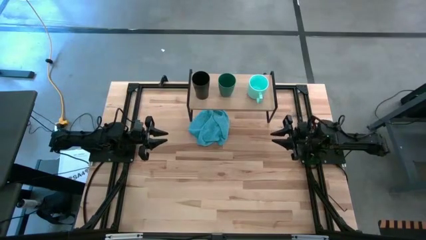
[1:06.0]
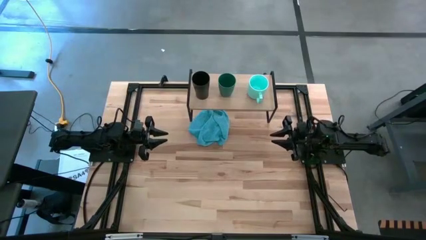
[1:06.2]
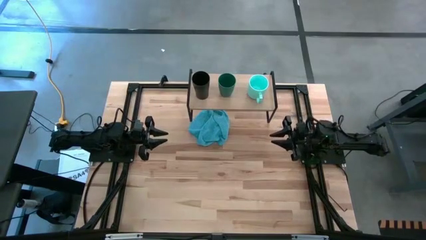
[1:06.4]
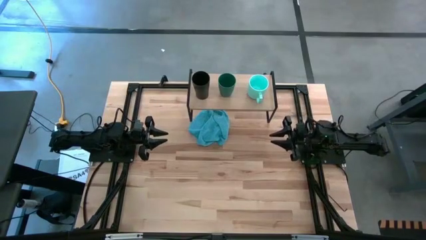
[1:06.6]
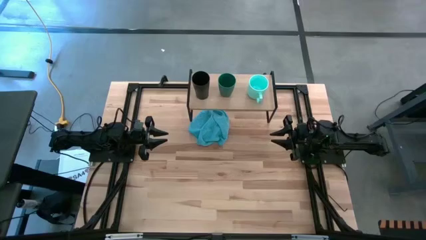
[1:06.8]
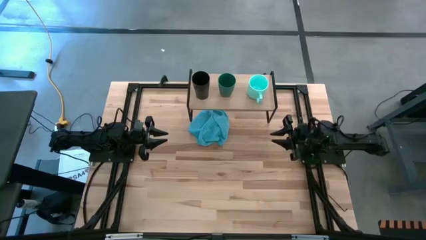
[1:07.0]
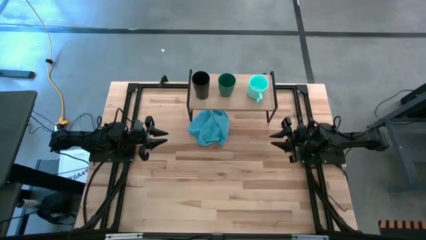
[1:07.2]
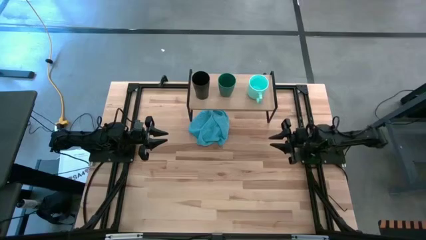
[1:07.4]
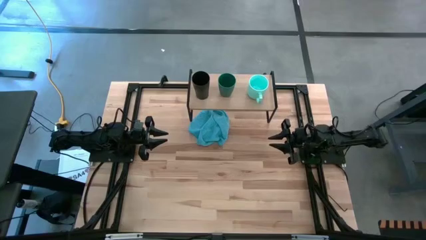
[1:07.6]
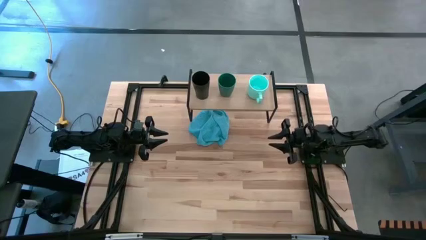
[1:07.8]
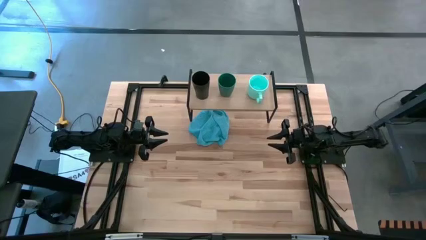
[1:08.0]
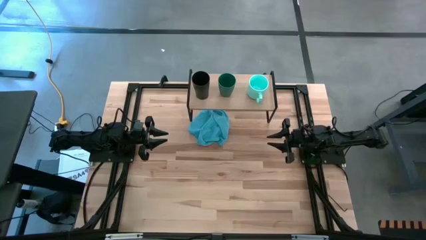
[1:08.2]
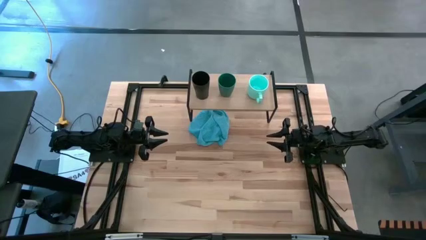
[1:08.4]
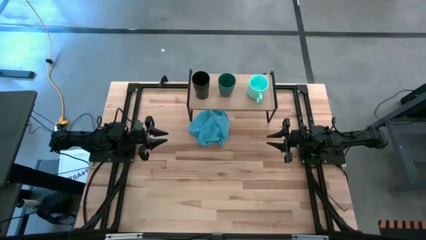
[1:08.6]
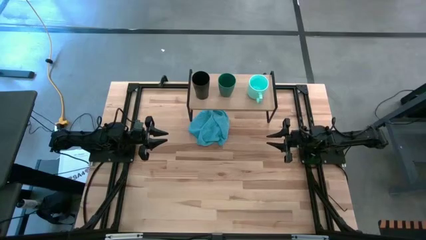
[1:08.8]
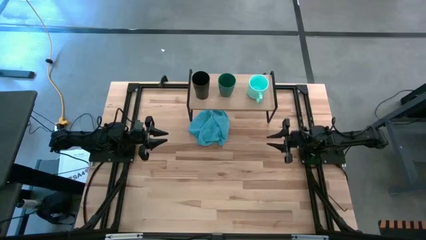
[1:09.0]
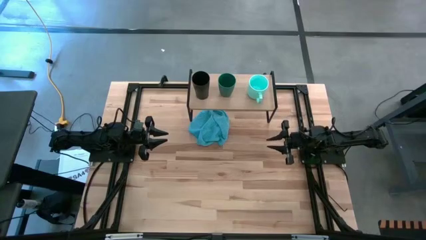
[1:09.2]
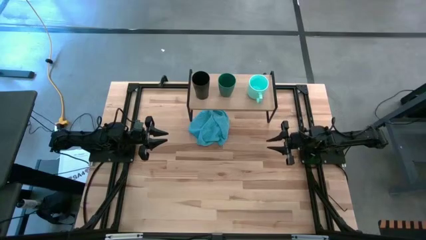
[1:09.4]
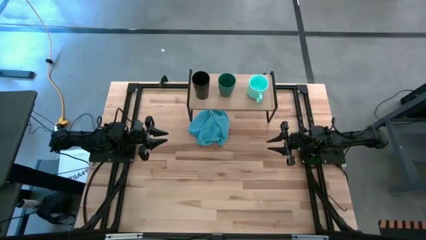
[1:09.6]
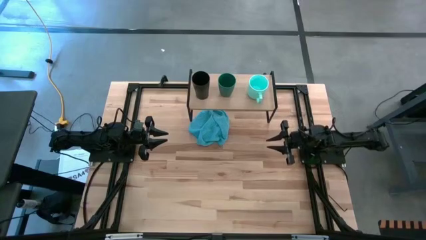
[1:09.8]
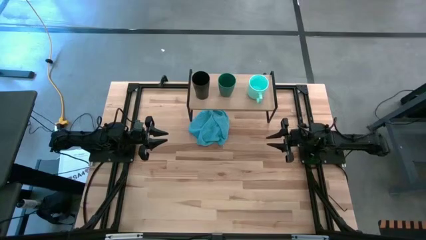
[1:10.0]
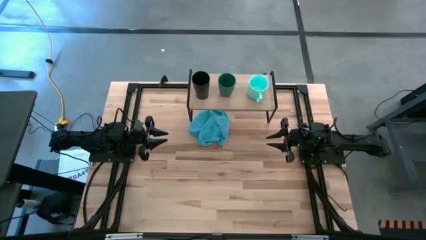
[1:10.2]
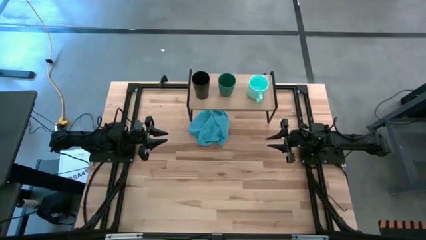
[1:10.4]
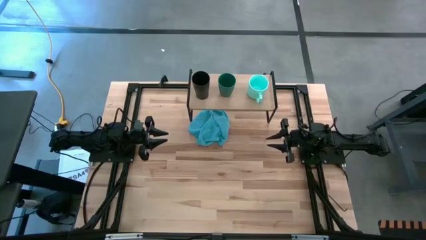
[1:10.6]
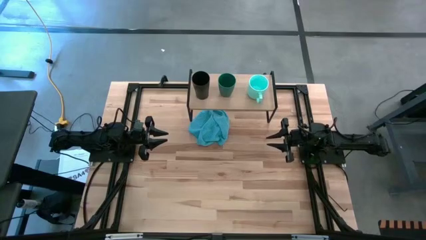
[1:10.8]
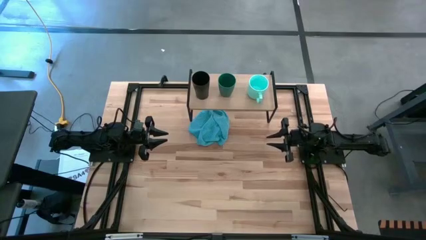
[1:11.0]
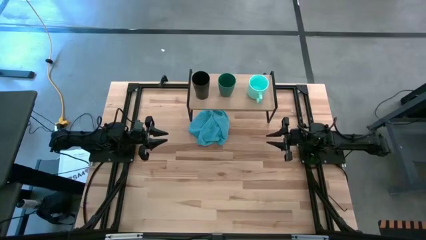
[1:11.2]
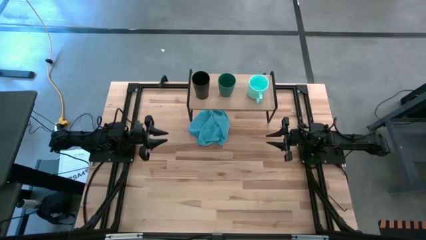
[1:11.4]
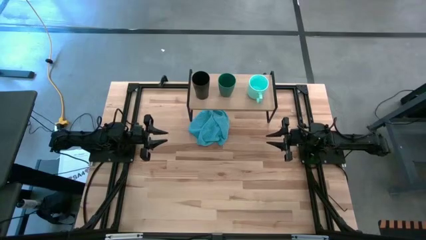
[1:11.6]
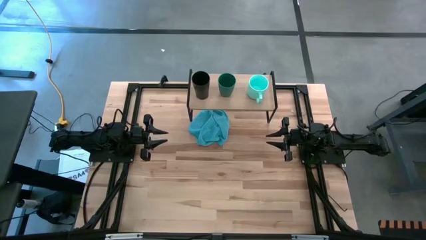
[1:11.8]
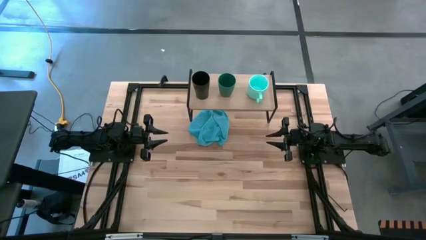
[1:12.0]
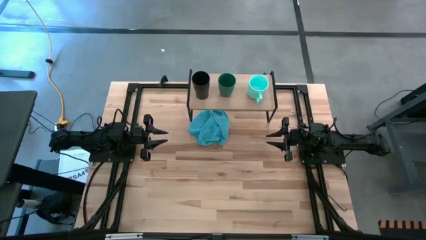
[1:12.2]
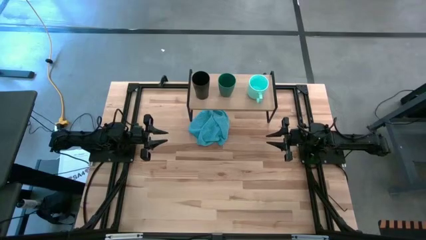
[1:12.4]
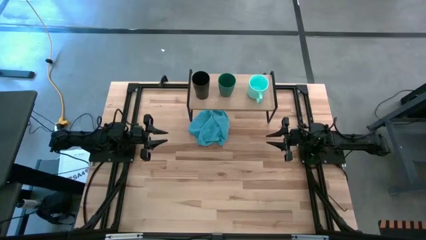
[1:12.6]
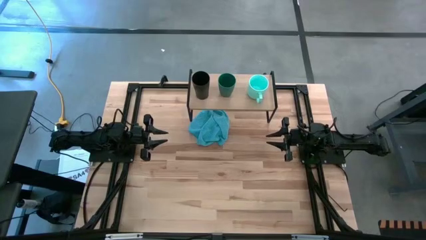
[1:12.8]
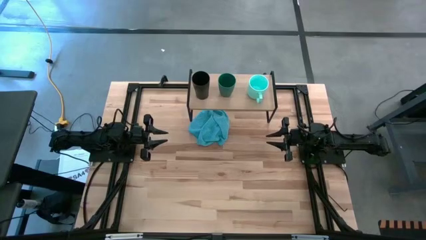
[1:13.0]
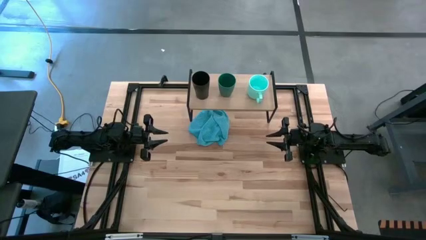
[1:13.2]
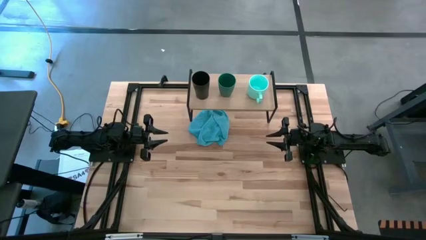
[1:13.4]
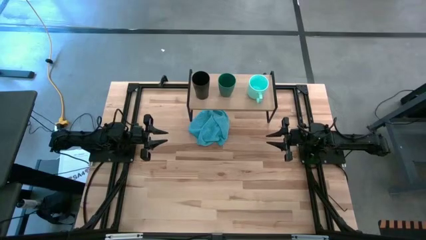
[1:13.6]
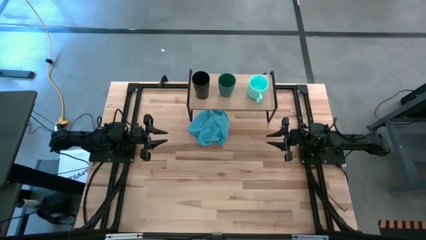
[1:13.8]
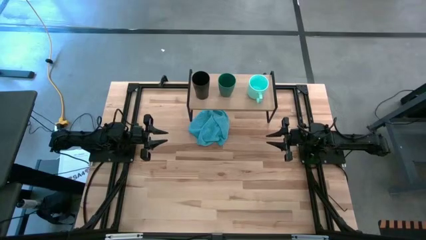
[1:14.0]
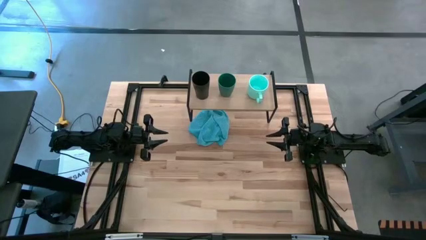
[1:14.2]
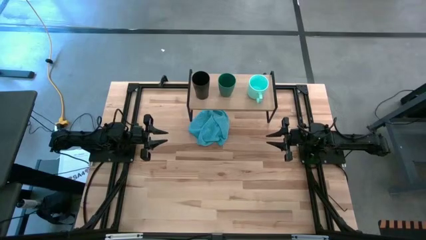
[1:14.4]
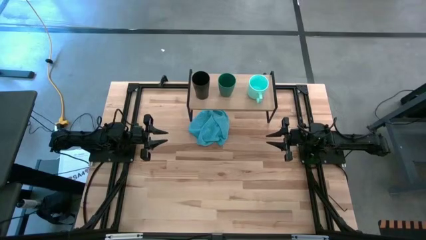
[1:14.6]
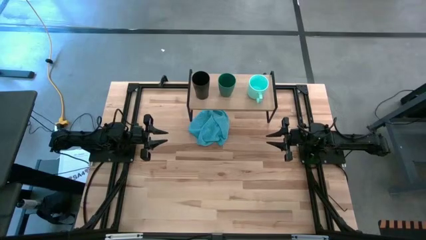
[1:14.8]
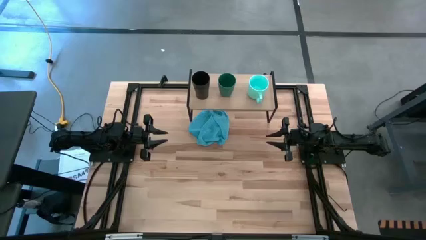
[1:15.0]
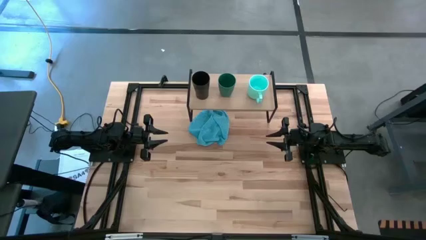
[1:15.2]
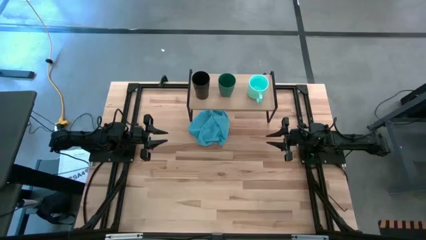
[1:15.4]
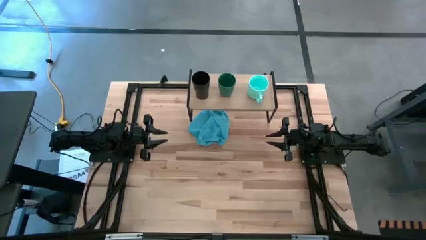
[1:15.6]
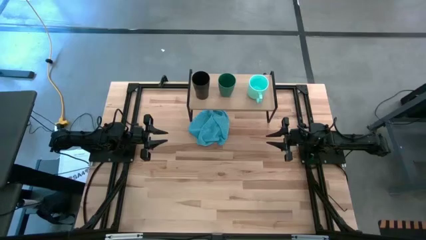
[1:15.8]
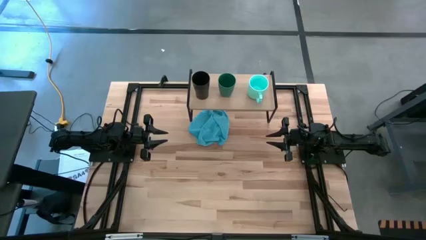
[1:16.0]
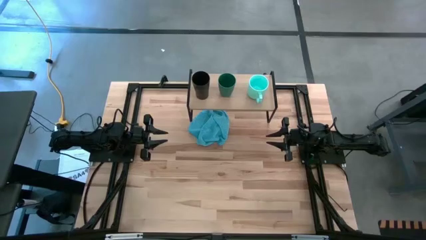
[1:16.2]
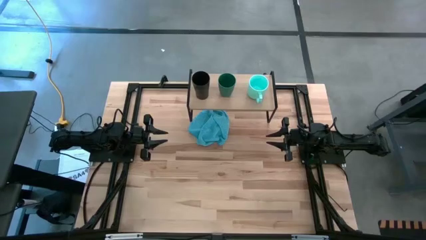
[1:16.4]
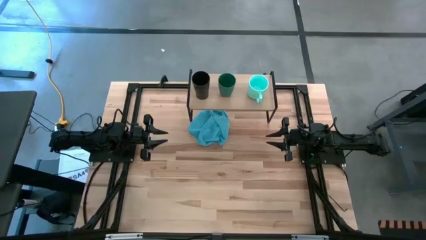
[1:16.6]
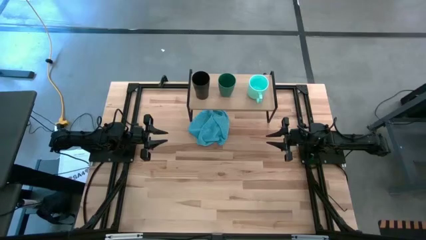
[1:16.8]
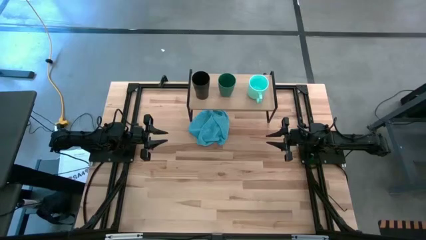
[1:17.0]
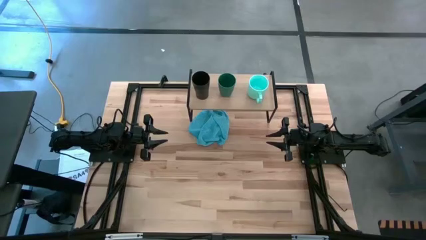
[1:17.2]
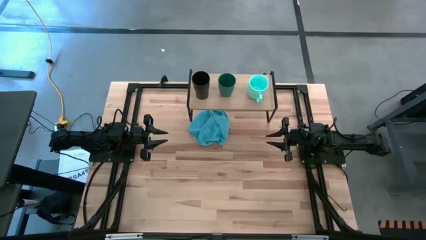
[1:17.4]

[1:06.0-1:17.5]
Task: Stack small to large cups/mugs on shelf
Return to Home Position
